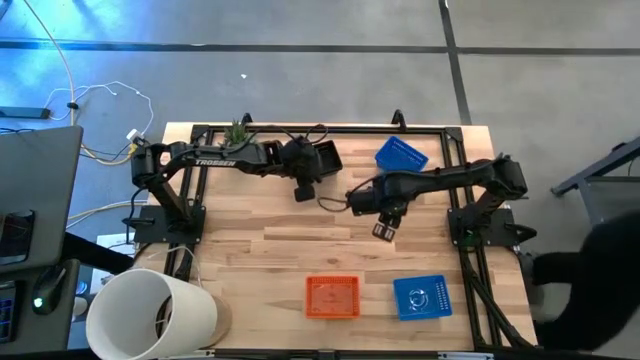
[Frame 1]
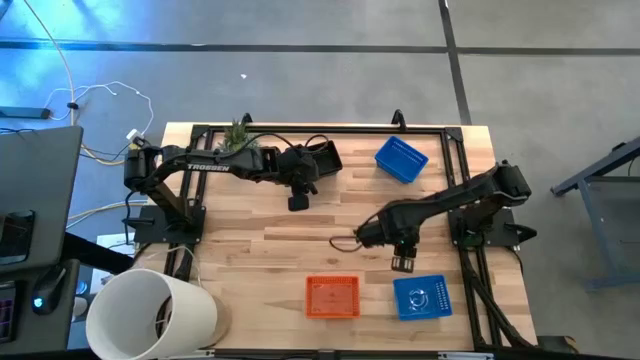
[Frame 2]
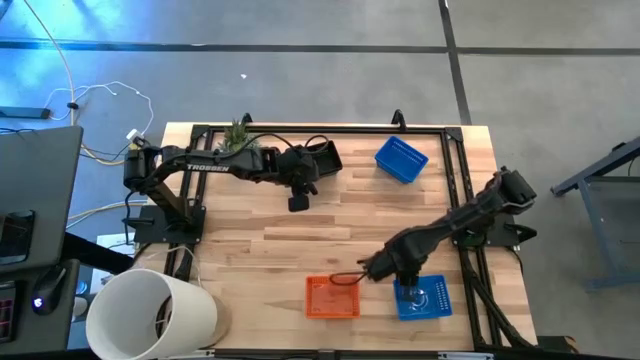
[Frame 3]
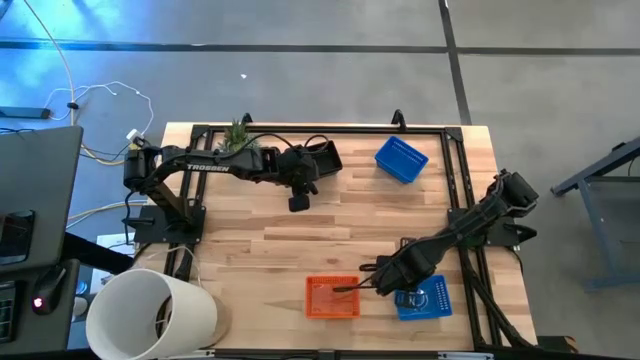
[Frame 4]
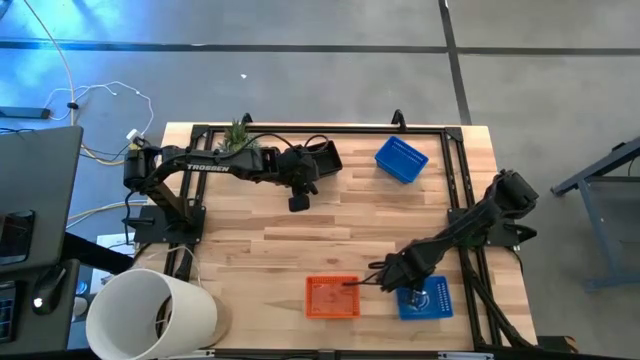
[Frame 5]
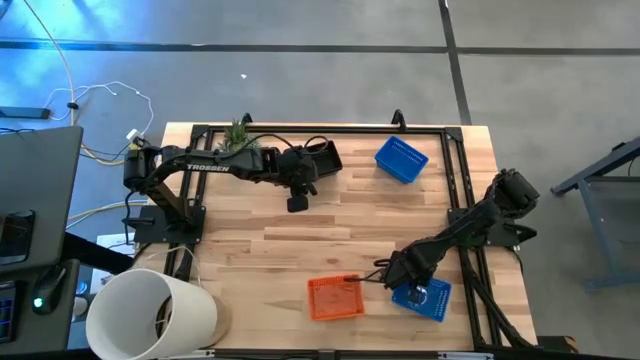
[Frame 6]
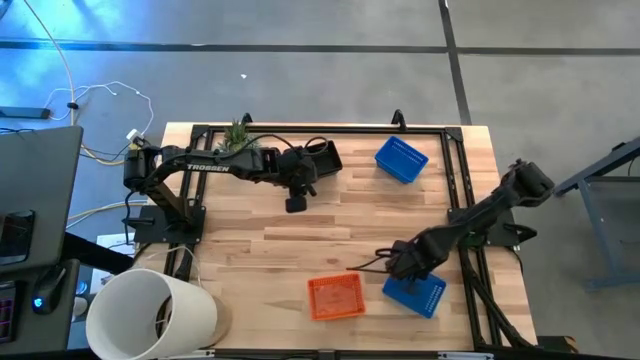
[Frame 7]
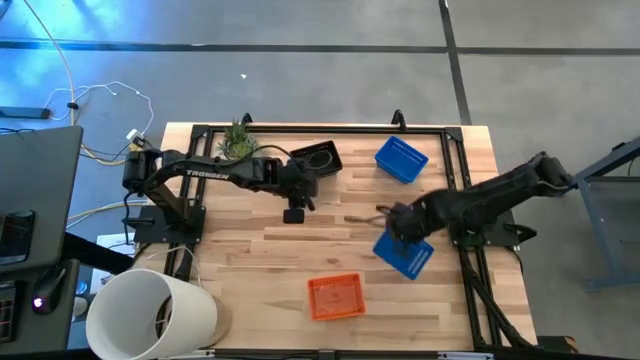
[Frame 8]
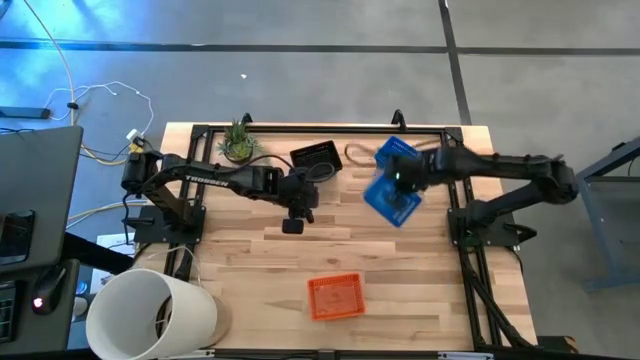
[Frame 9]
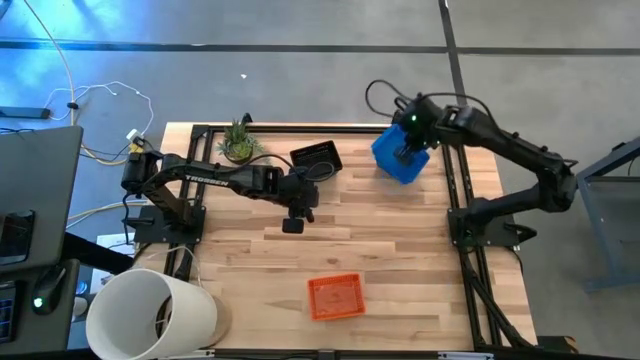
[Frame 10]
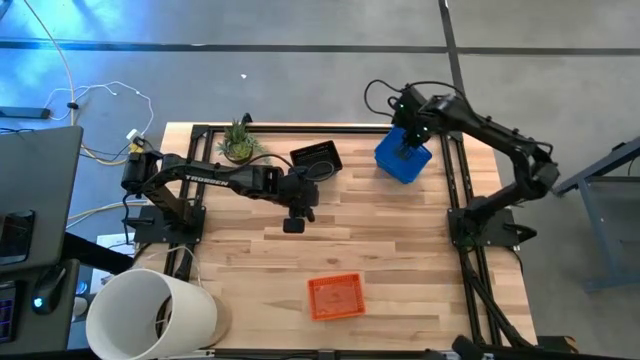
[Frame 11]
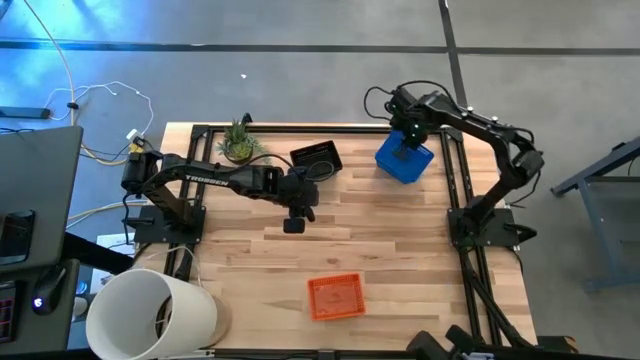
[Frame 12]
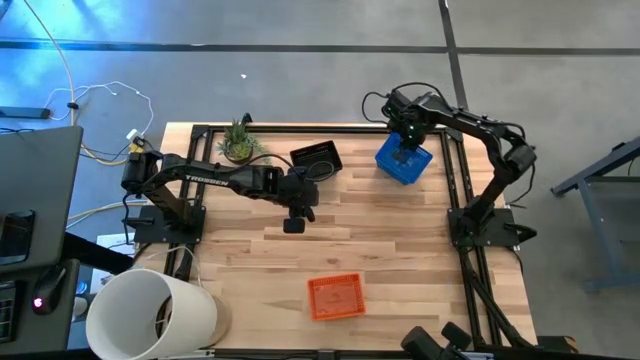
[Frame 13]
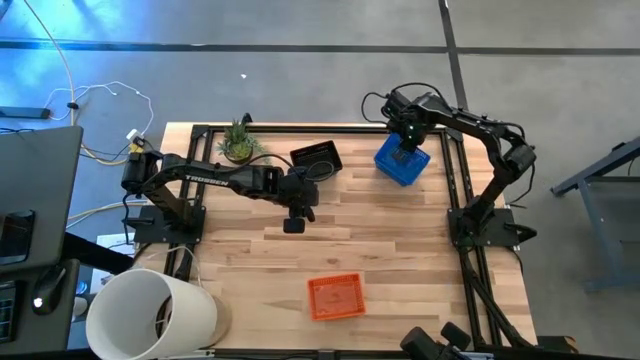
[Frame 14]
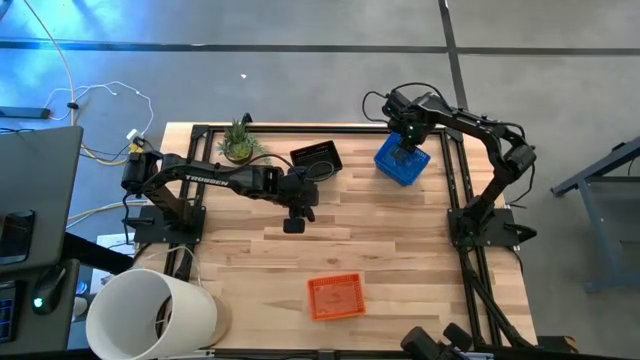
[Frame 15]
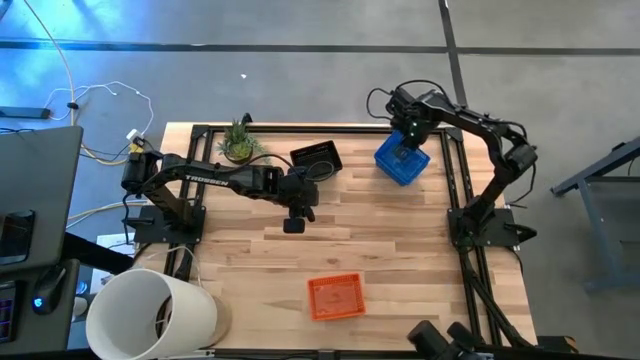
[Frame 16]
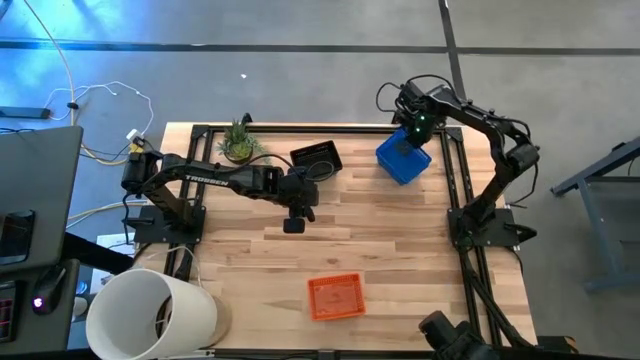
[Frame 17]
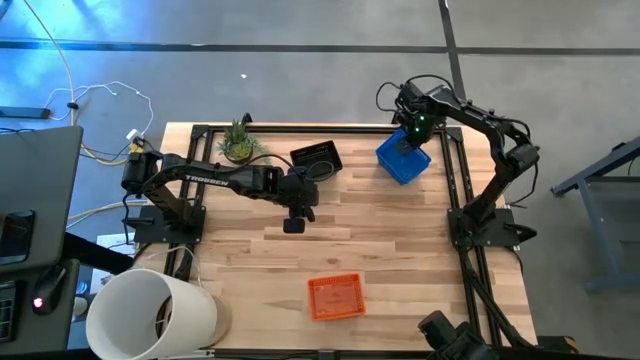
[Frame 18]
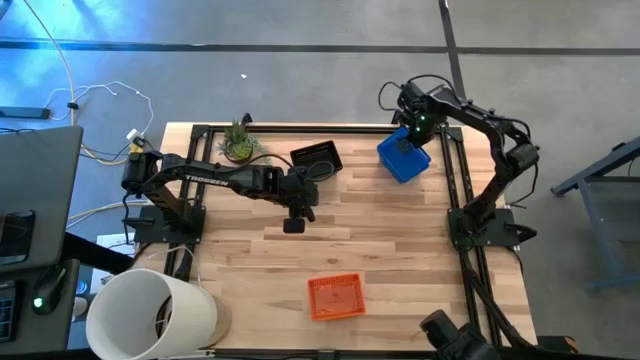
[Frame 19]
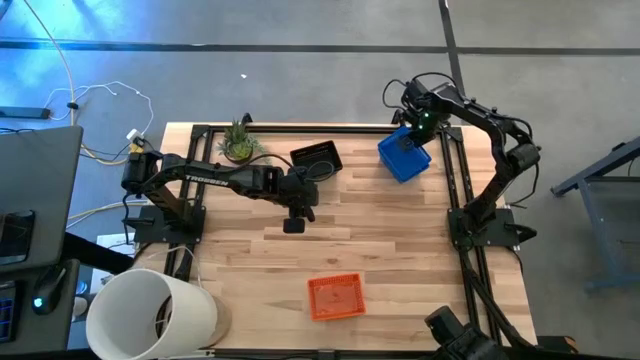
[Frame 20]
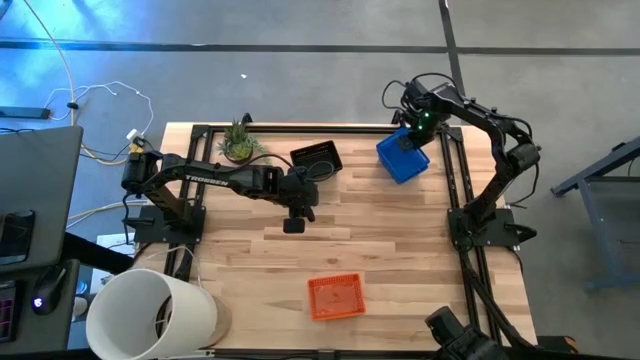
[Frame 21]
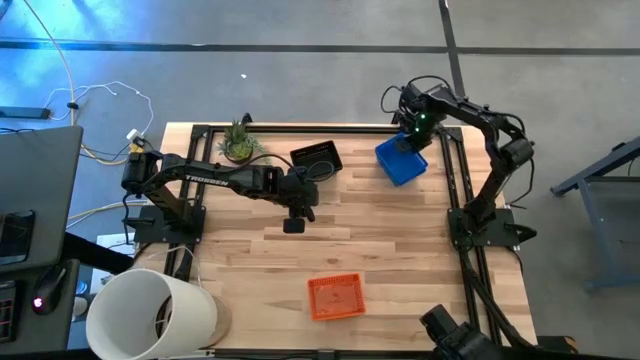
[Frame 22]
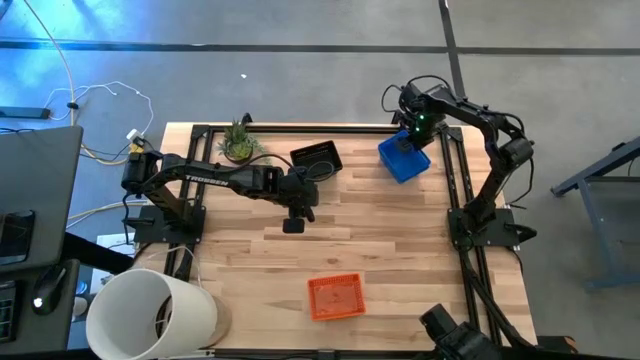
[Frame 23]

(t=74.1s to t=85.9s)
Stack the bottom blue basket on top of the top blue basket

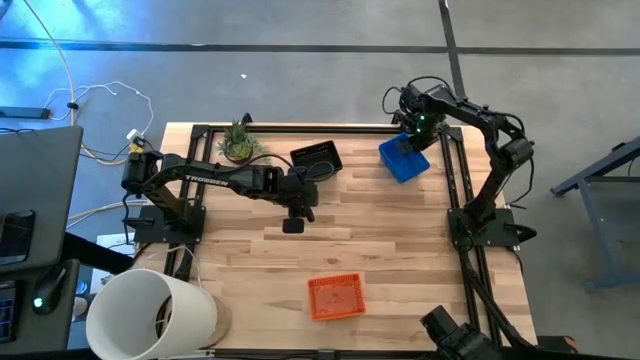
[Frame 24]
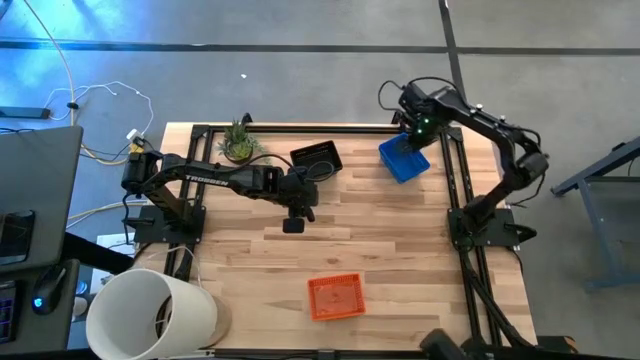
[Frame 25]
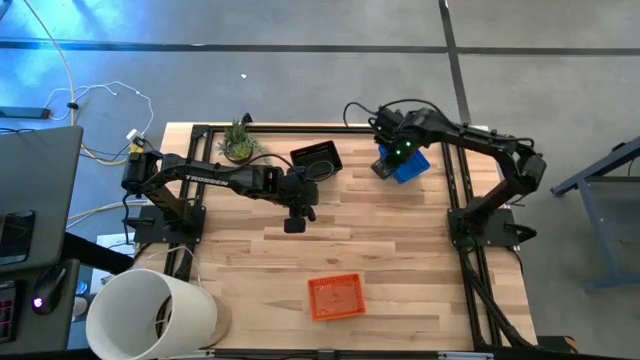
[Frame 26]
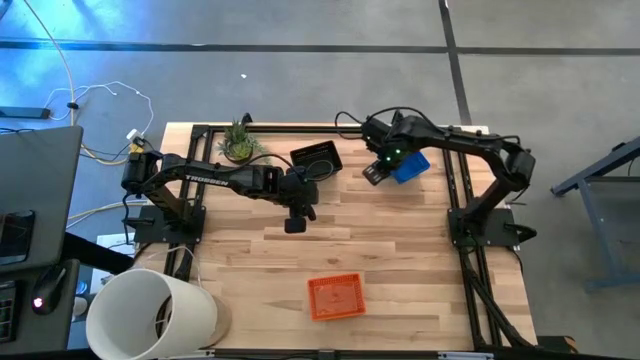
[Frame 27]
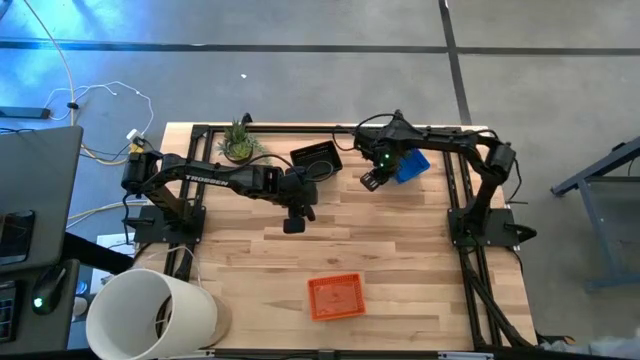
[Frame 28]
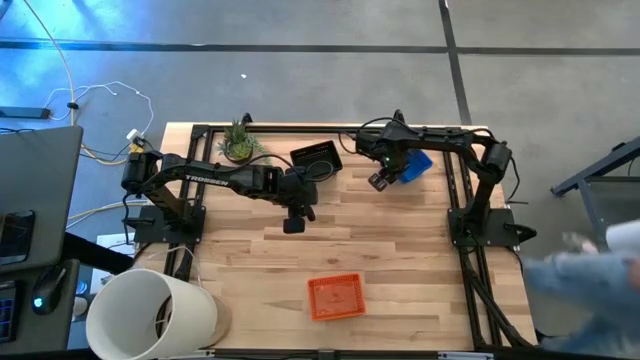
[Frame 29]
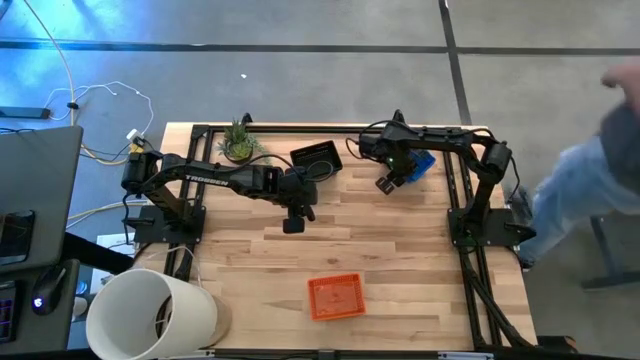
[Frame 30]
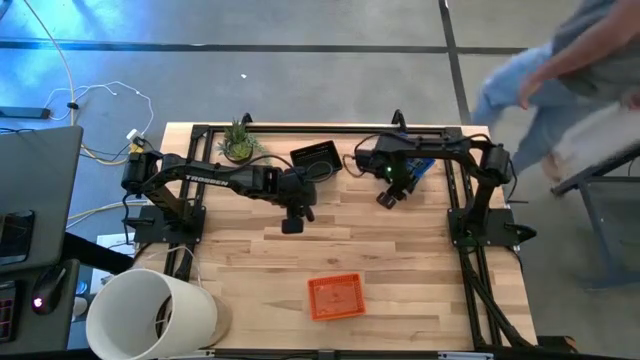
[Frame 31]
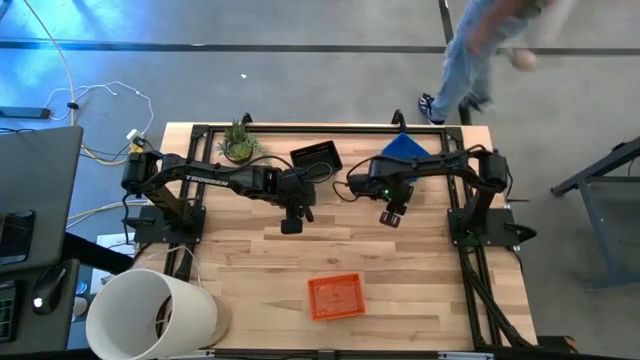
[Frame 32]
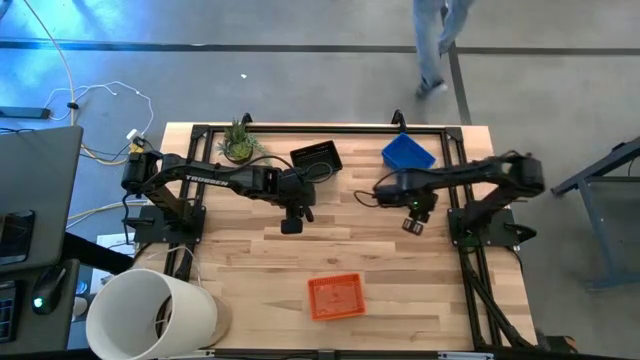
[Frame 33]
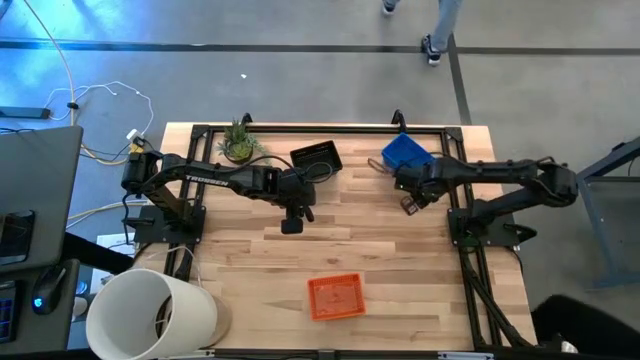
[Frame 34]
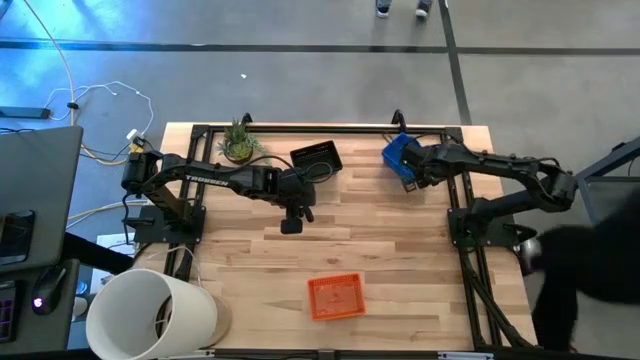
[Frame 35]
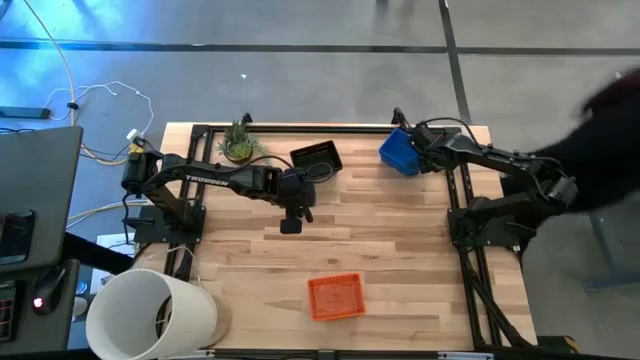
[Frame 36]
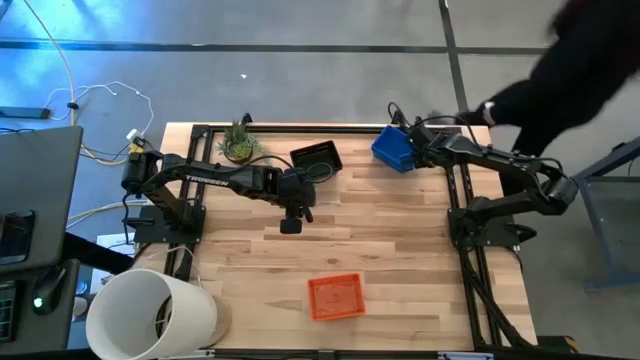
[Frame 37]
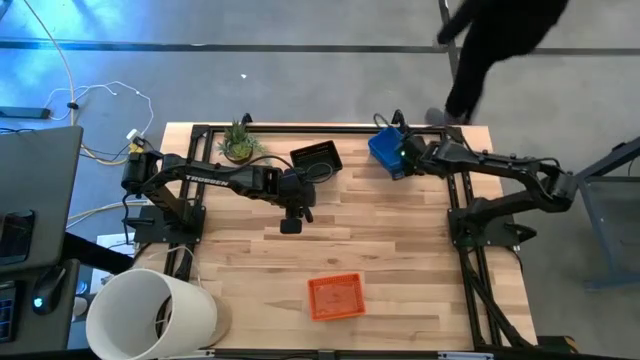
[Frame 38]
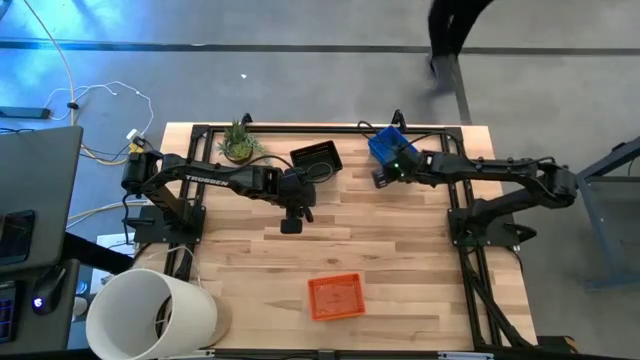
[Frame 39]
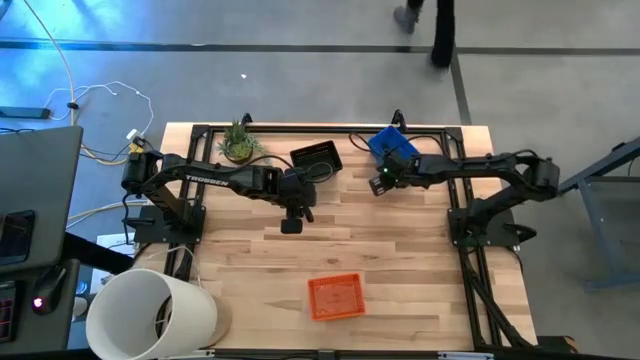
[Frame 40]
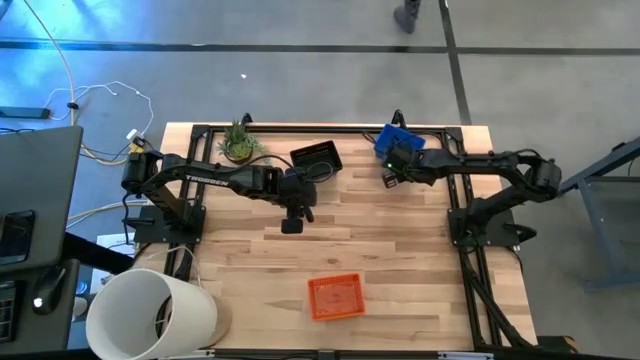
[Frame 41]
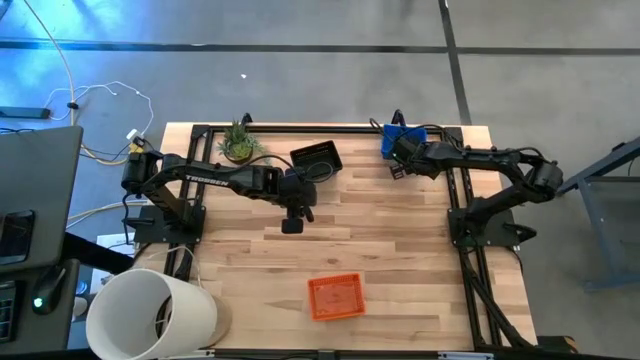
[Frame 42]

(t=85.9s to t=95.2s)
Adjust the stacked blue baskets

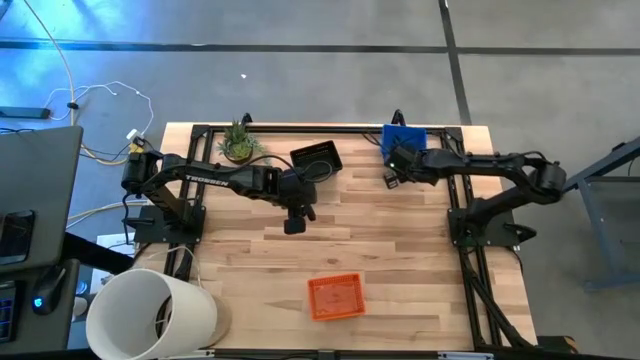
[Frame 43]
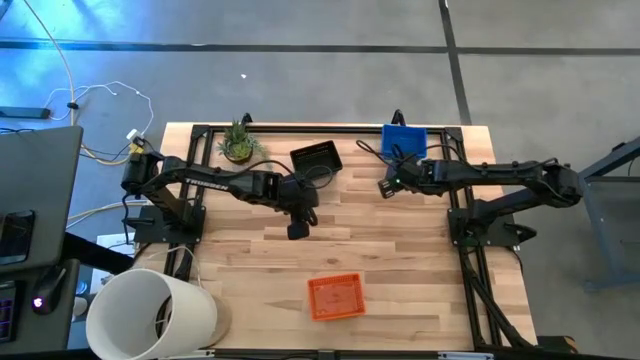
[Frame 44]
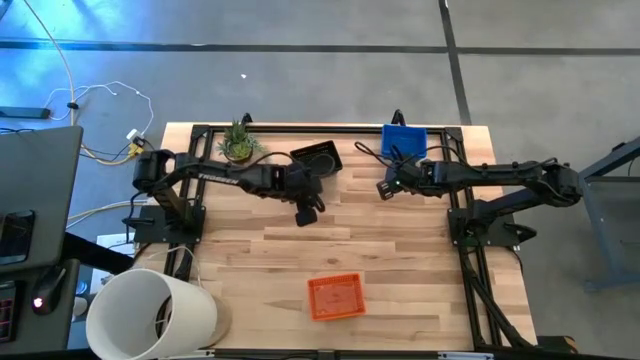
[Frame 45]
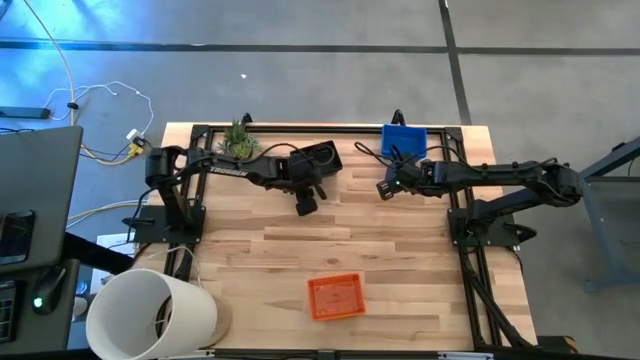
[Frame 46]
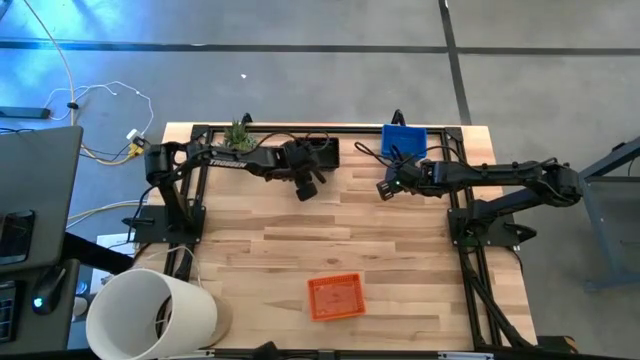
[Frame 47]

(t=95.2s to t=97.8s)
Adjust the stacked black baskets
